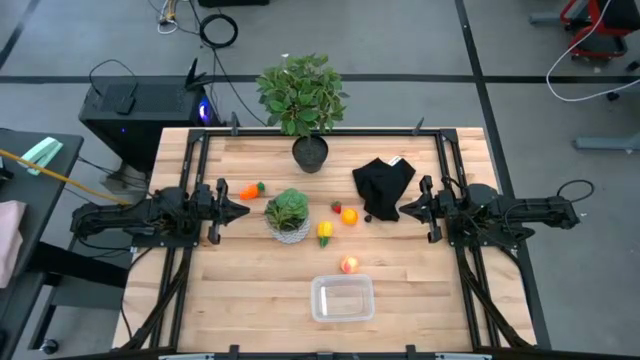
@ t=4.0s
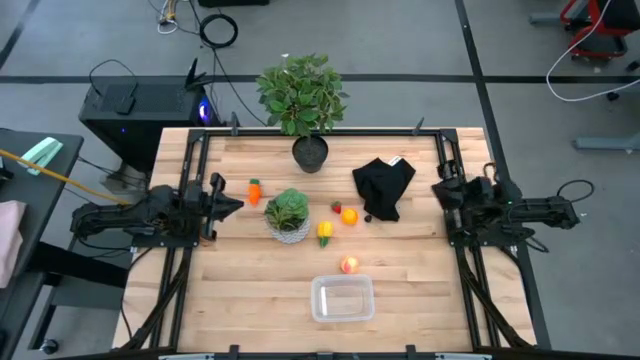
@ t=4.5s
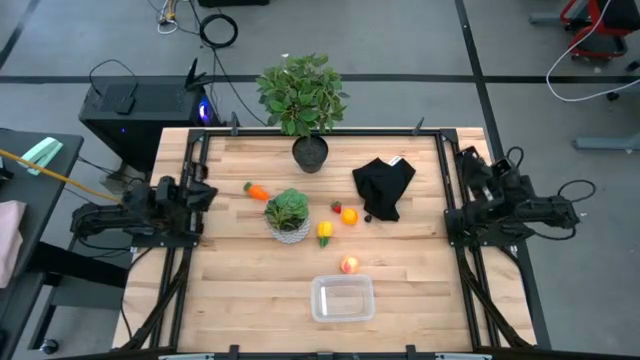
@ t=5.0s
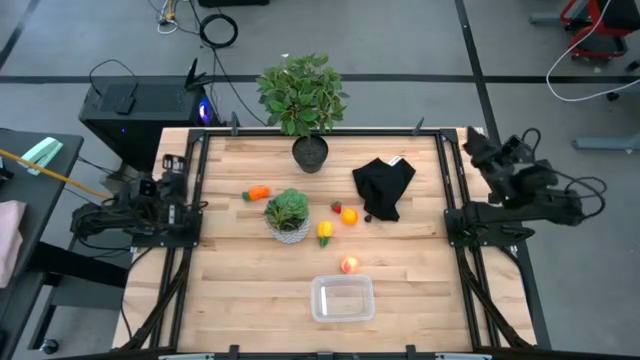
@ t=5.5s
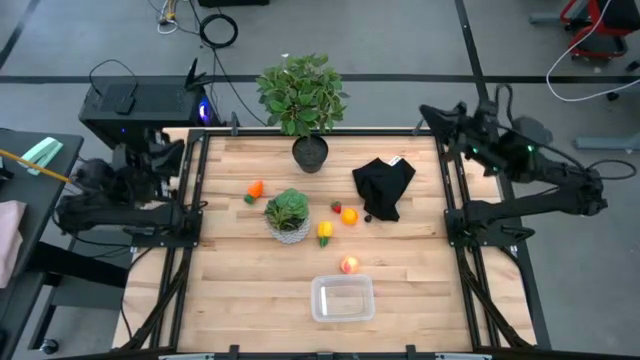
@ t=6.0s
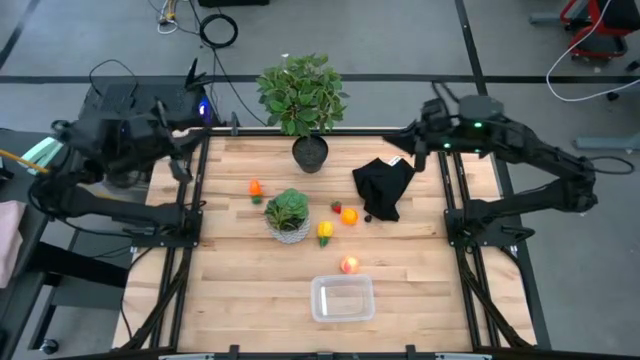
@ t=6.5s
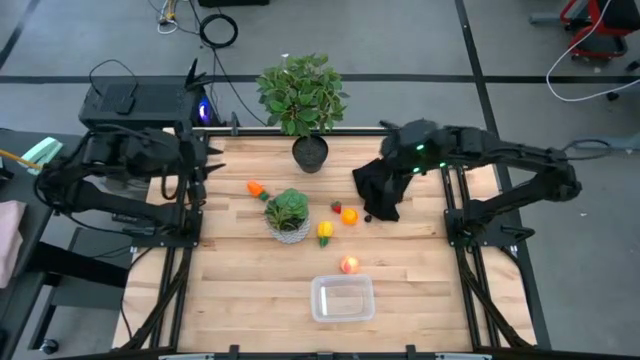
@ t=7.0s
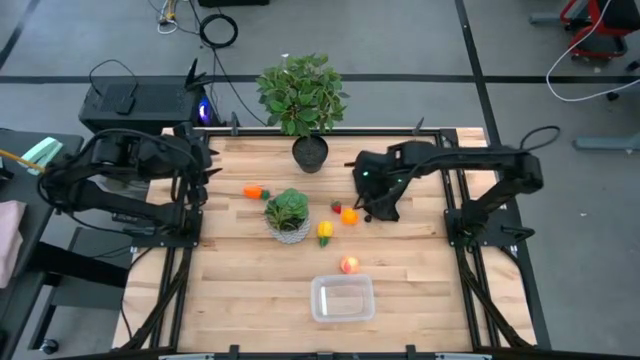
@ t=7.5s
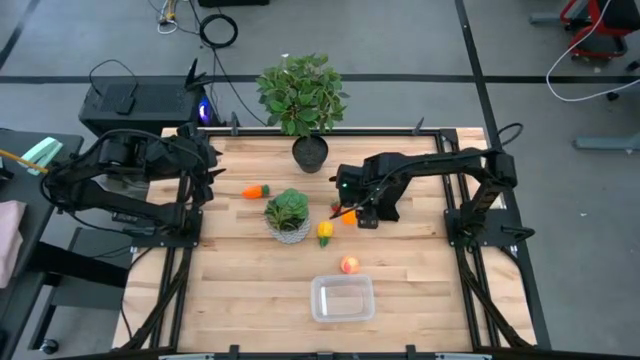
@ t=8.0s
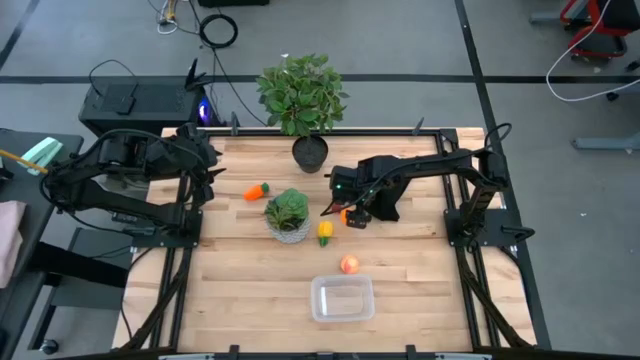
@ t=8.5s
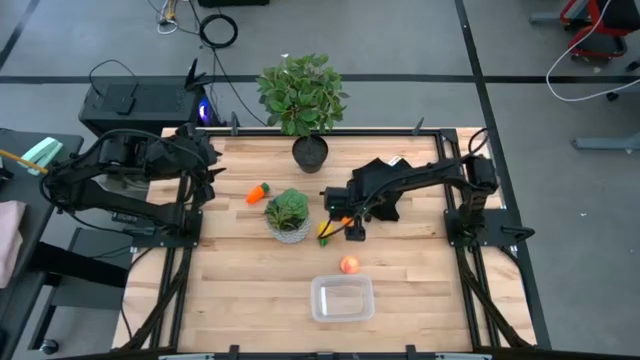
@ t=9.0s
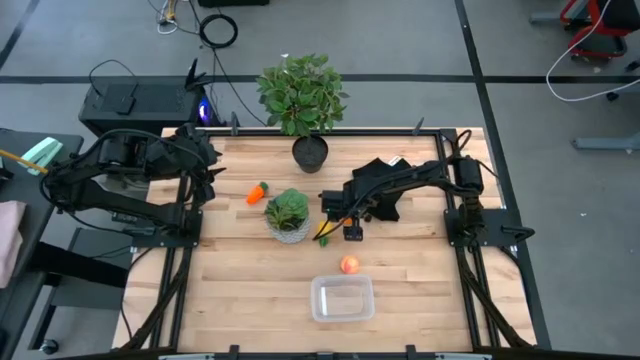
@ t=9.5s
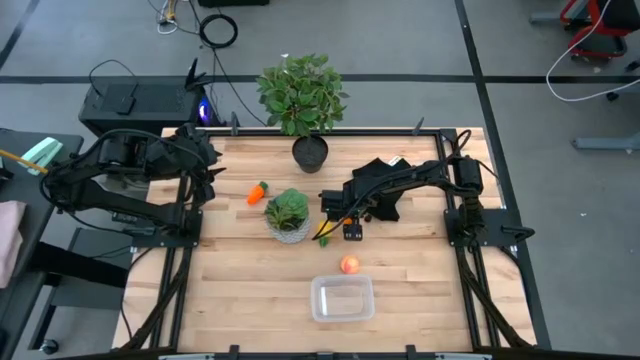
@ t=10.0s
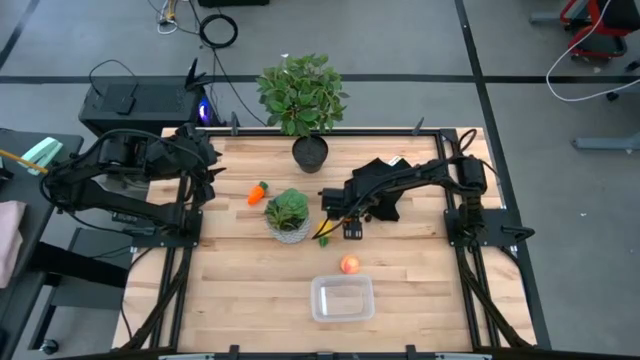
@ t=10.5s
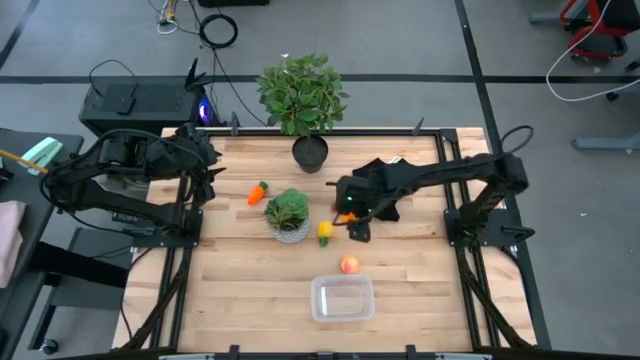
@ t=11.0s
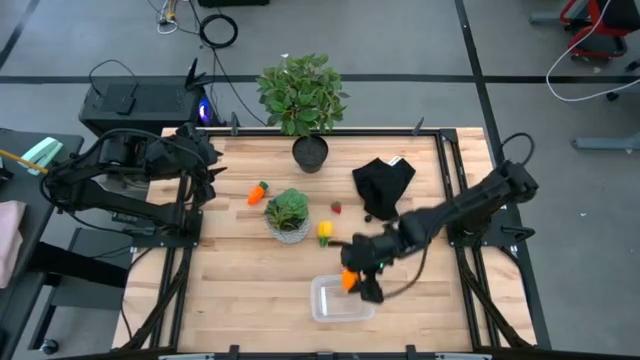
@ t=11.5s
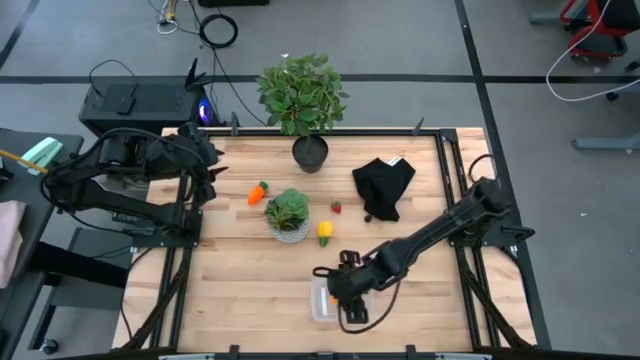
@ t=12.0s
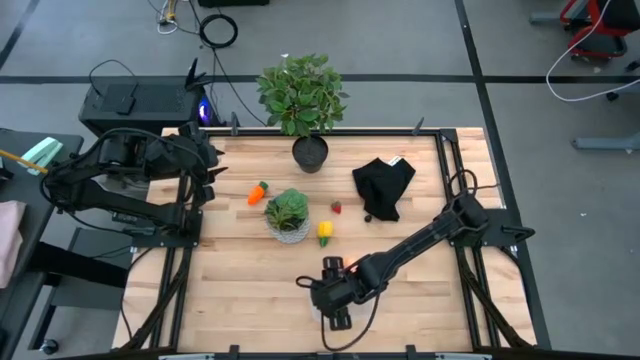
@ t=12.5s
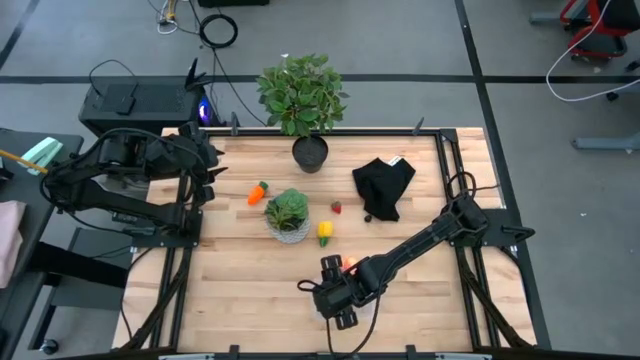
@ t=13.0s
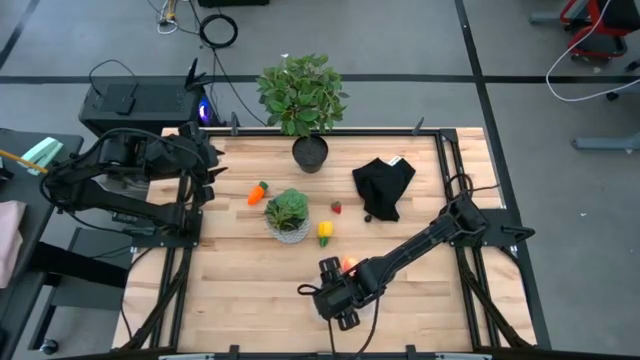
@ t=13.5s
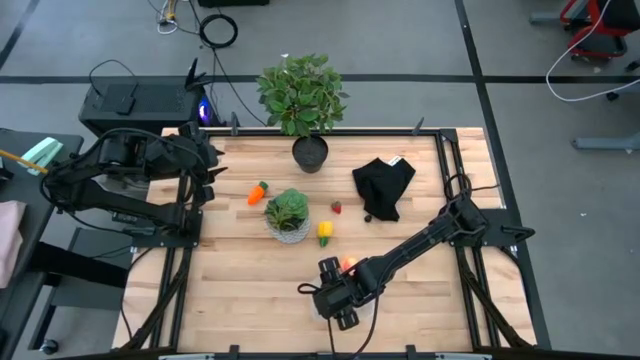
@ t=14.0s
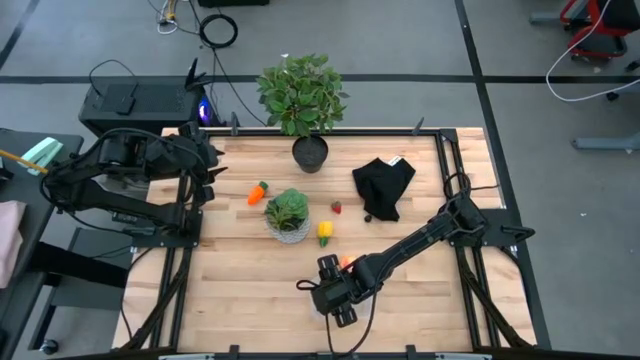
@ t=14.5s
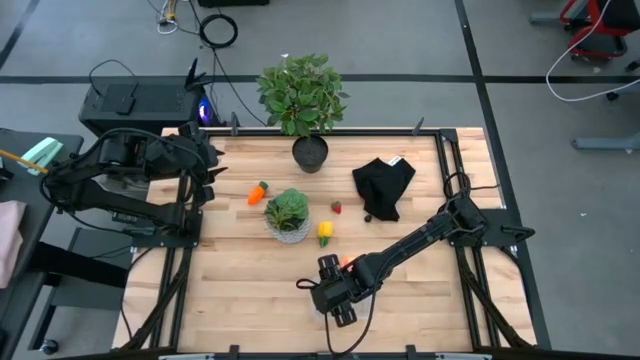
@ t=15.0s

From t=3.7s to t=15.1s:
Task: Pick and placing Produce into tupperware
Put the orange in the transparent bin

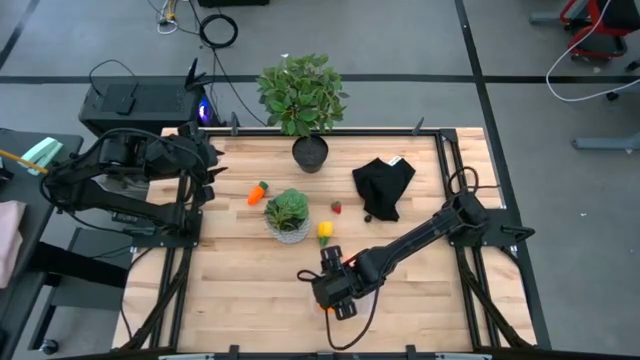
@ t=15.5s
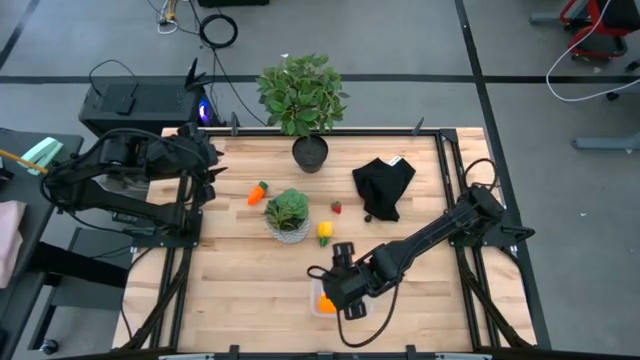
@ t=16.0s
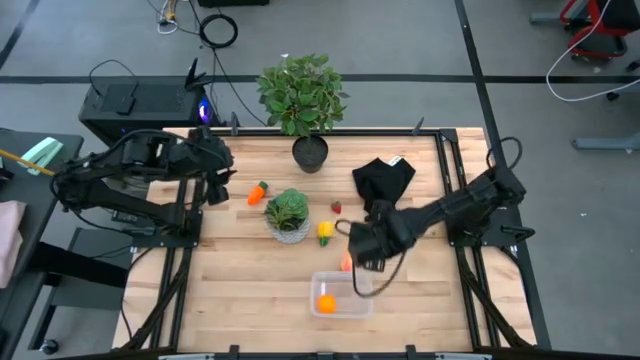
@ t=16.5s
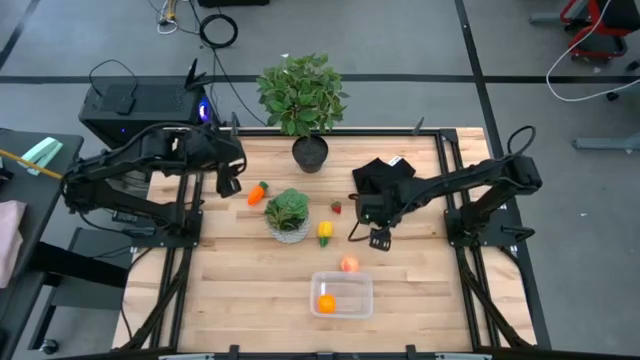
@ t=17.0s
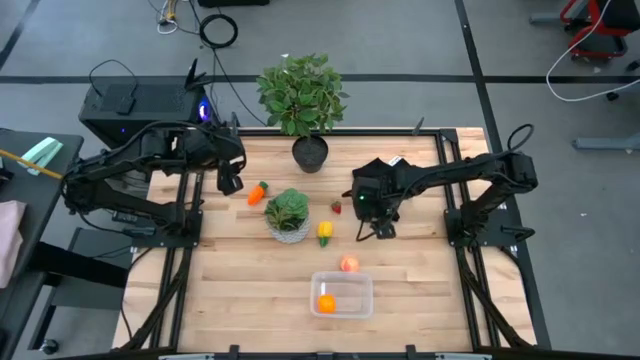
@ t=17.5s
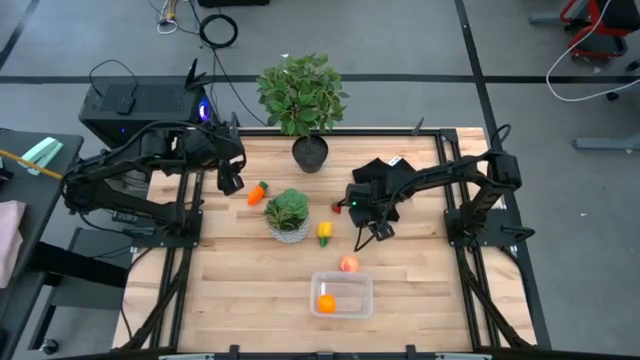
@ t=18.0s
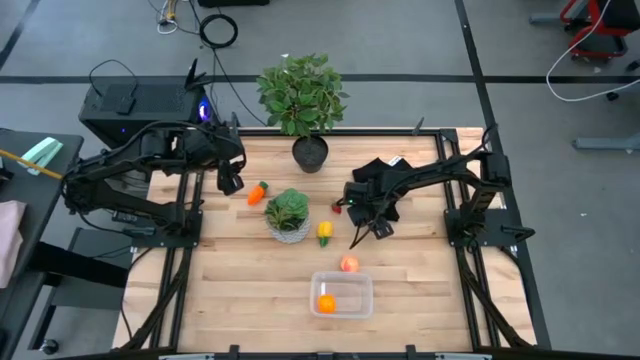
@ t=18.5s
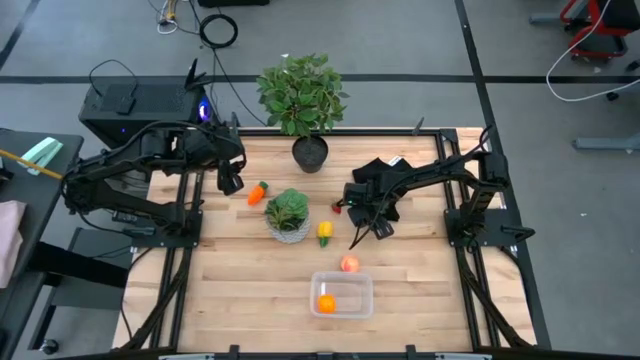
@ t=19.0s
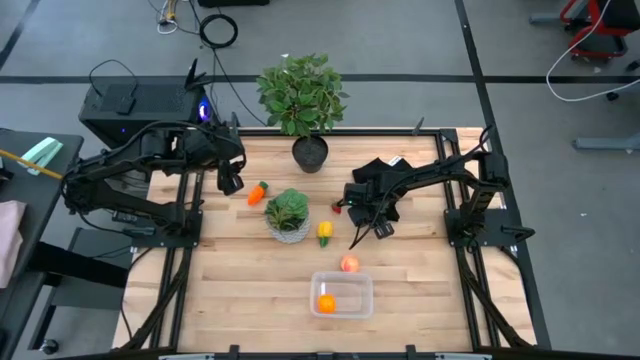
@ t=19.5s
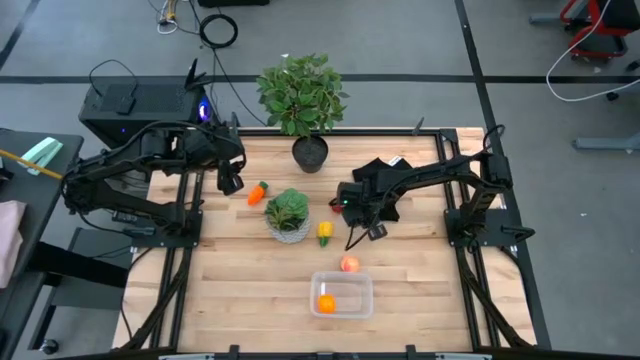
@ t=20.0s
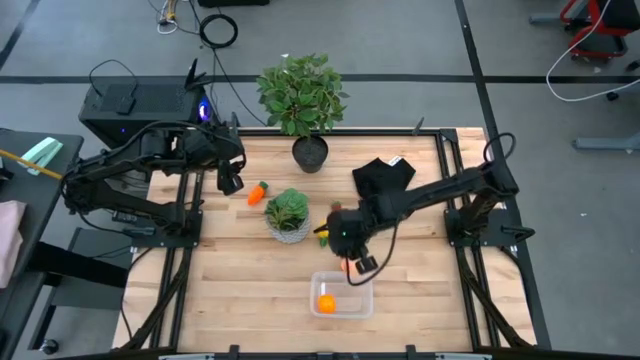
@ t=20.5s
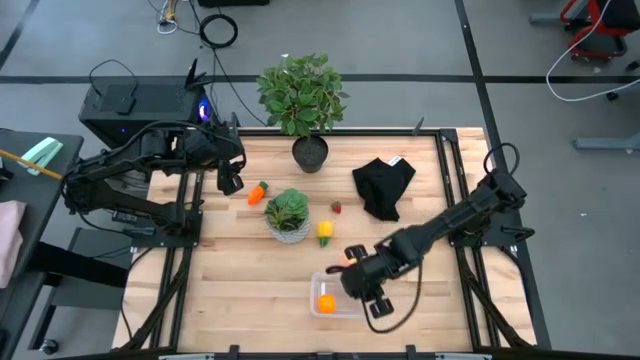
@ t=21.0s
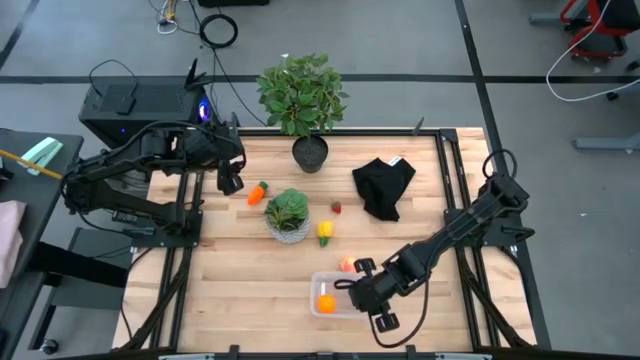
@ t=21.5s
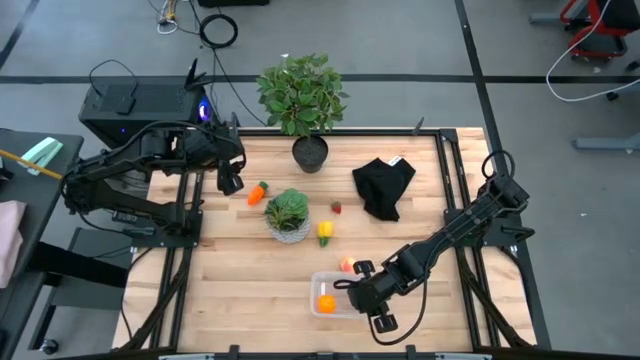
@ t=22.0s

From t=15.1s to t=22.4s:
Put the blackberry in the transparent bin

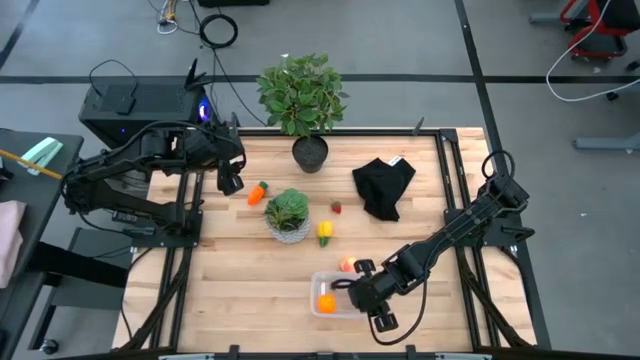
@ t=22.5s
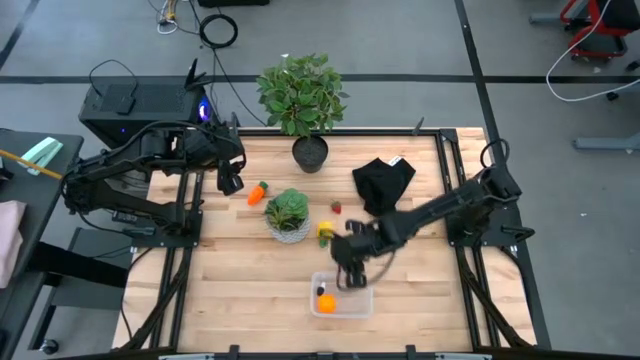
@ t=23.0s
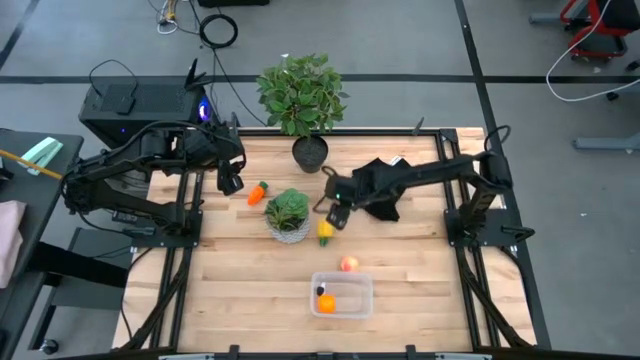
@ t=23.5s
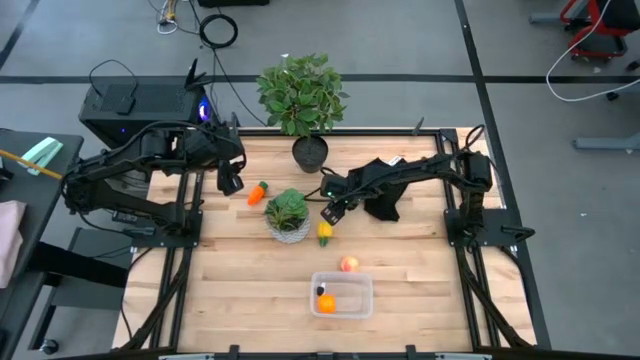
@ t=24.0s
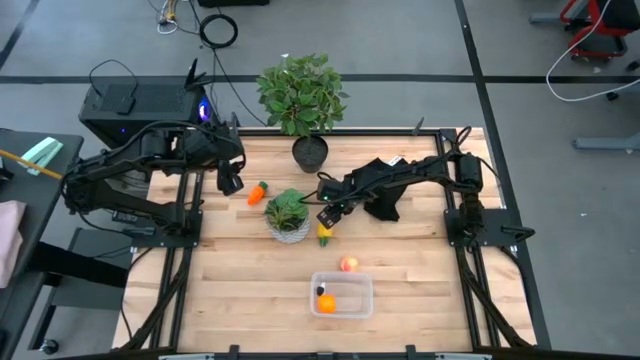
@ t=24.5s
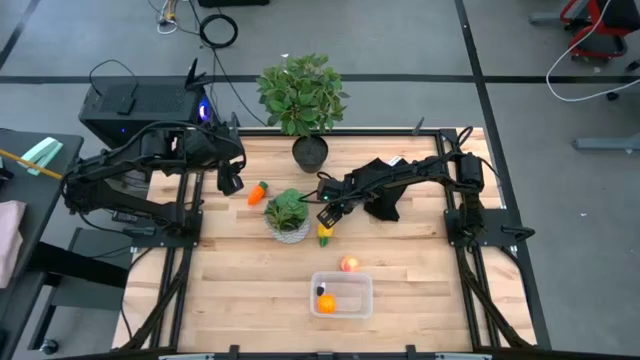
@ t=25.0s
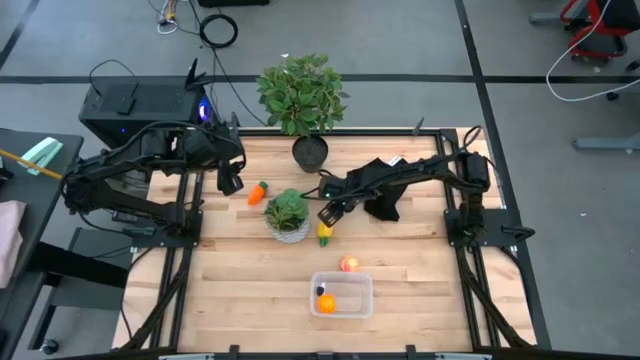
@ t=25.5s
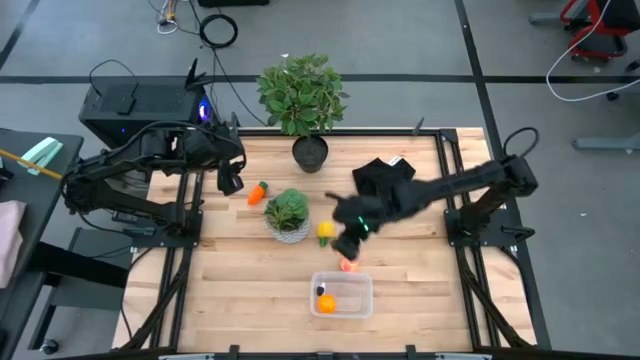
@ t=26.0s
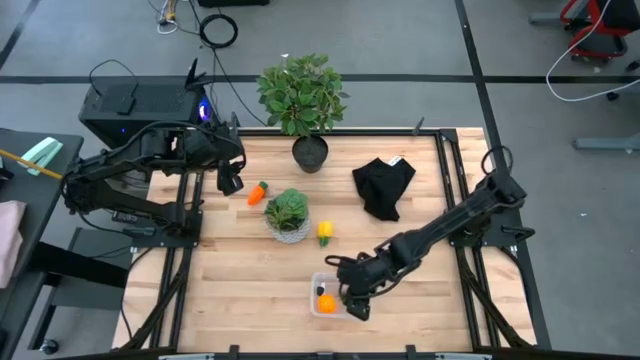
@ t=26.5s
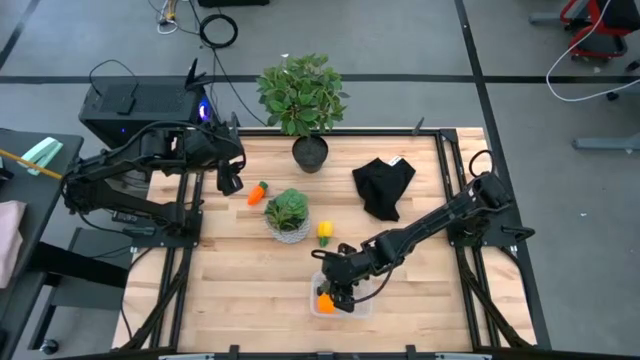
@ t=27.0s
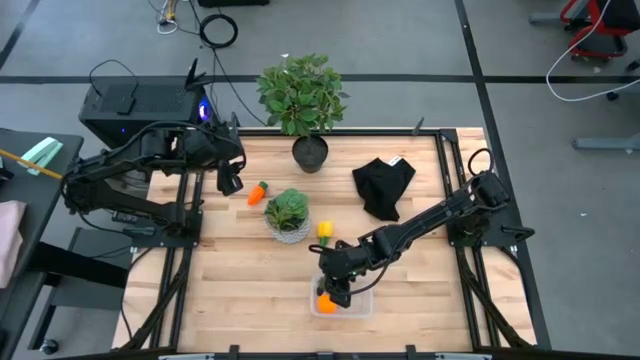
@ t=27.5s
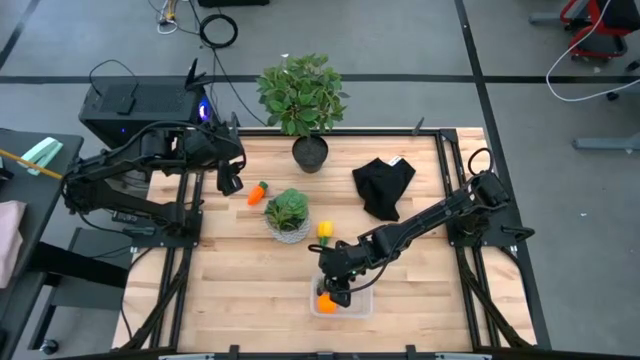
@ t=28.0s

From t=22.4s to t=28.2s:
Put the strawberry in the transparent bin
